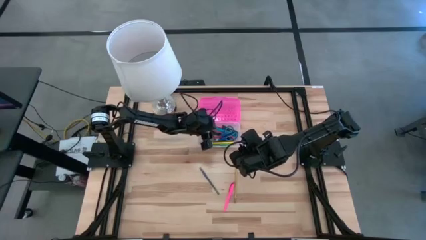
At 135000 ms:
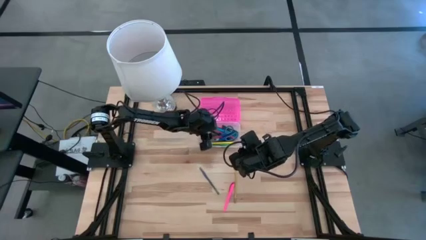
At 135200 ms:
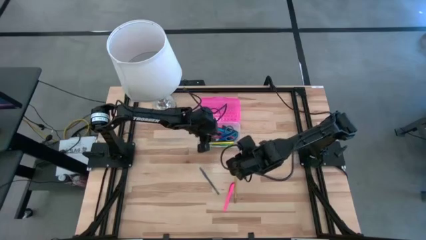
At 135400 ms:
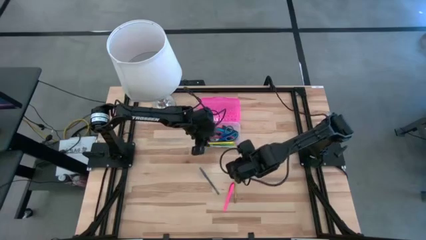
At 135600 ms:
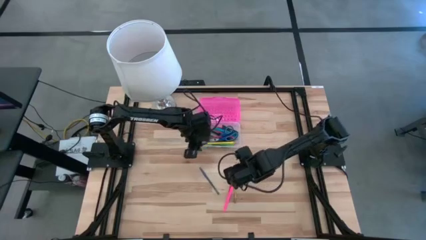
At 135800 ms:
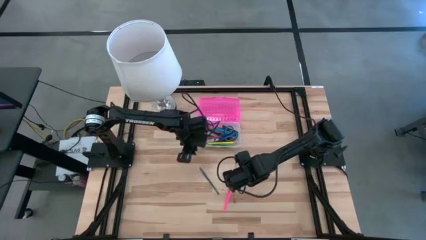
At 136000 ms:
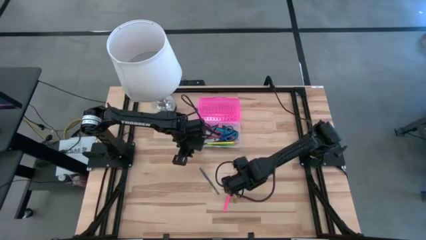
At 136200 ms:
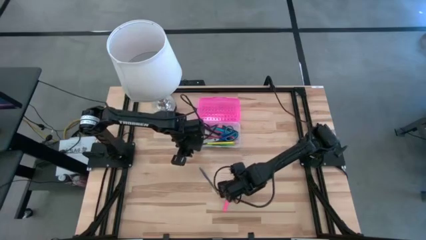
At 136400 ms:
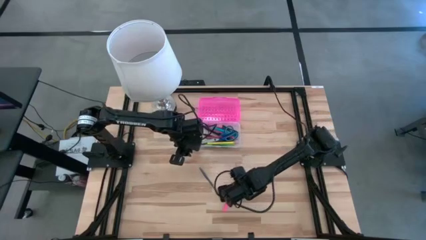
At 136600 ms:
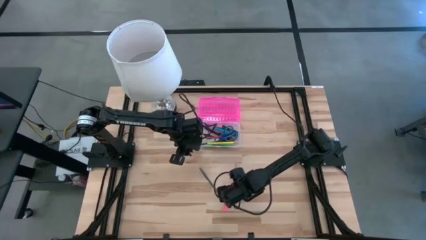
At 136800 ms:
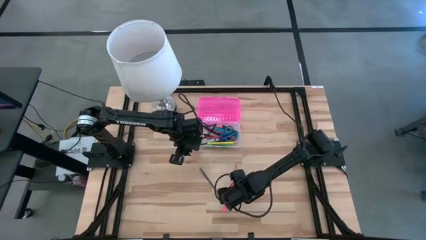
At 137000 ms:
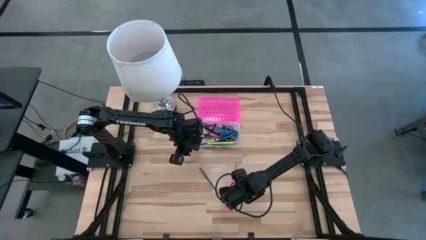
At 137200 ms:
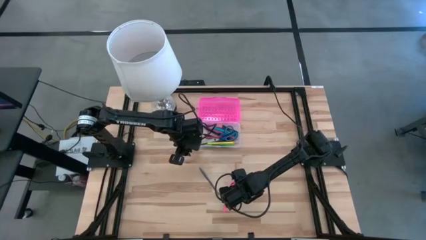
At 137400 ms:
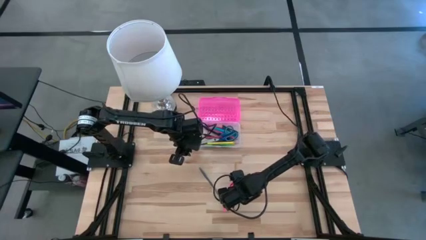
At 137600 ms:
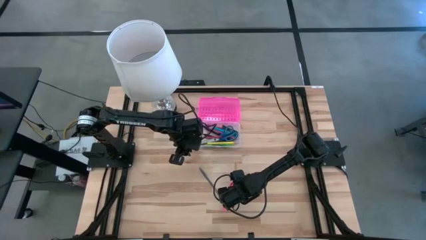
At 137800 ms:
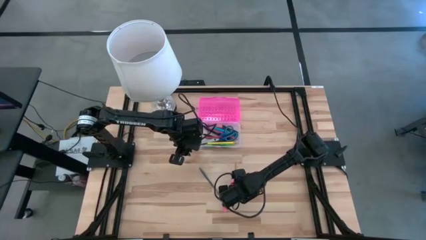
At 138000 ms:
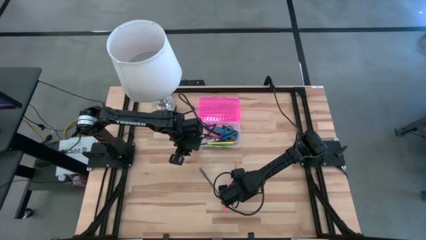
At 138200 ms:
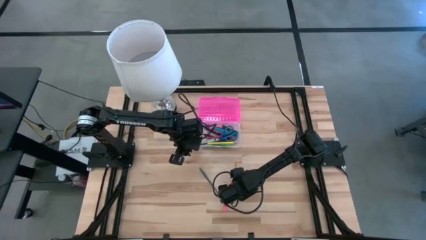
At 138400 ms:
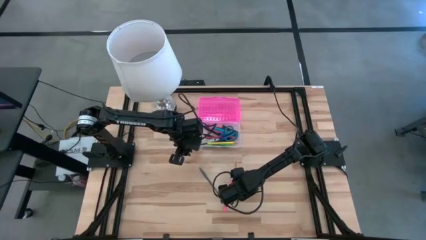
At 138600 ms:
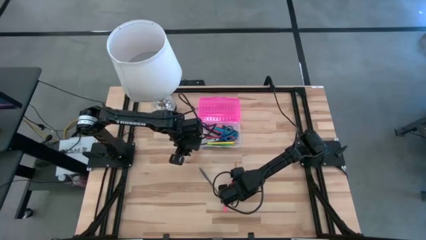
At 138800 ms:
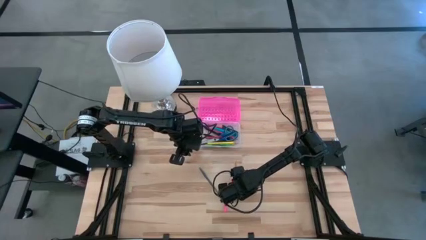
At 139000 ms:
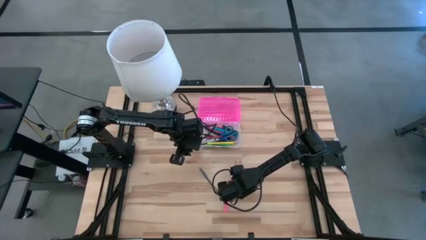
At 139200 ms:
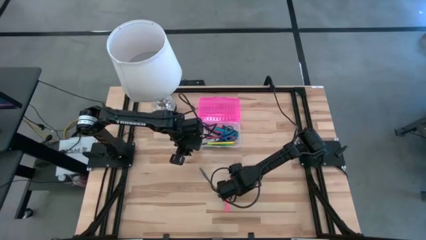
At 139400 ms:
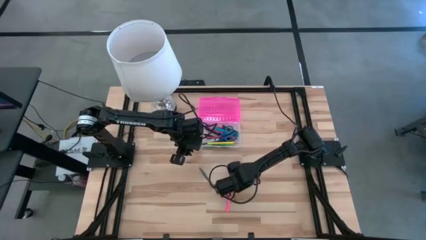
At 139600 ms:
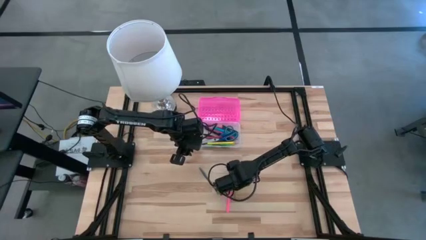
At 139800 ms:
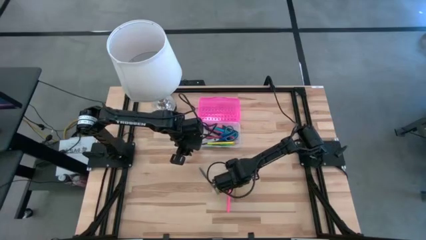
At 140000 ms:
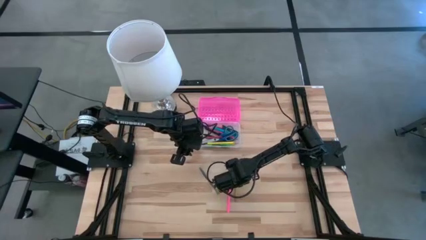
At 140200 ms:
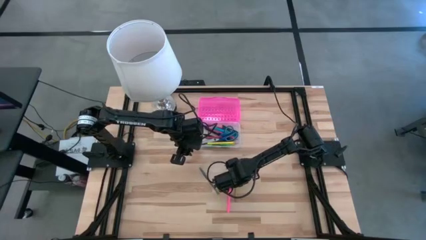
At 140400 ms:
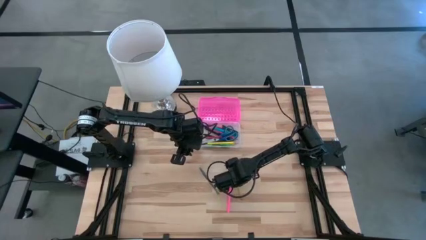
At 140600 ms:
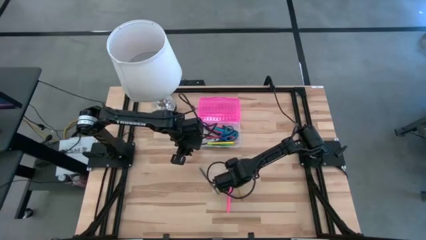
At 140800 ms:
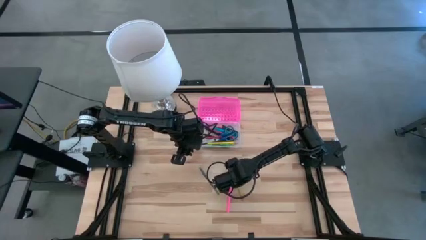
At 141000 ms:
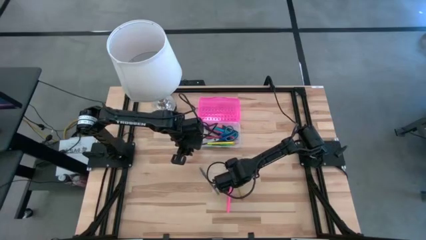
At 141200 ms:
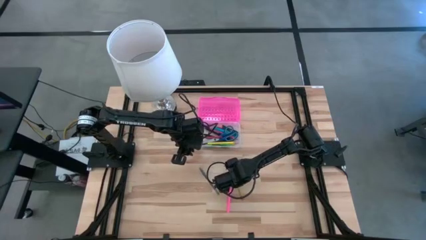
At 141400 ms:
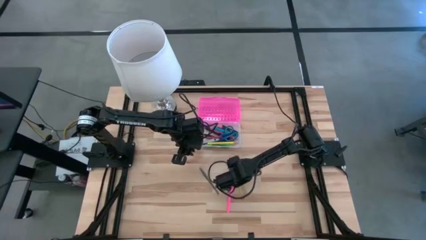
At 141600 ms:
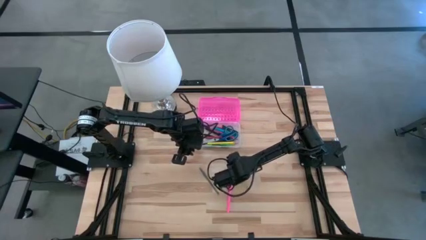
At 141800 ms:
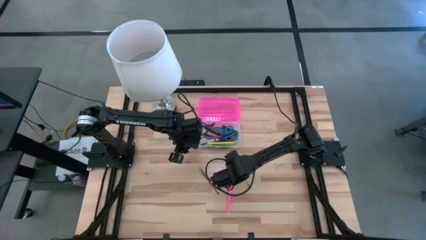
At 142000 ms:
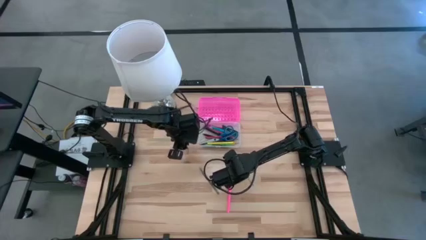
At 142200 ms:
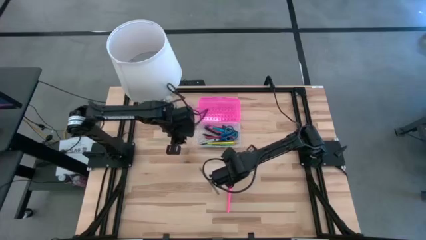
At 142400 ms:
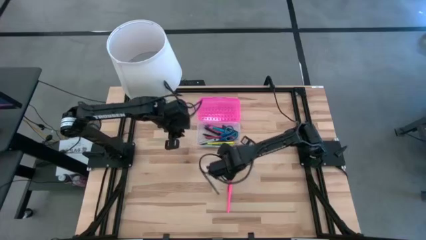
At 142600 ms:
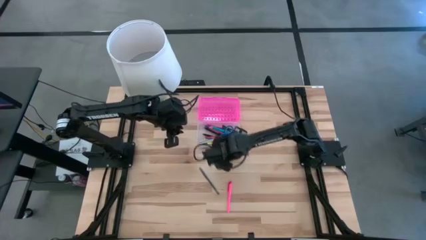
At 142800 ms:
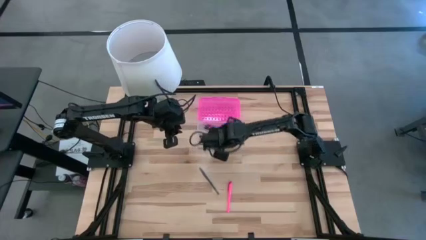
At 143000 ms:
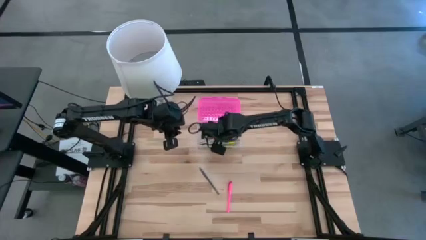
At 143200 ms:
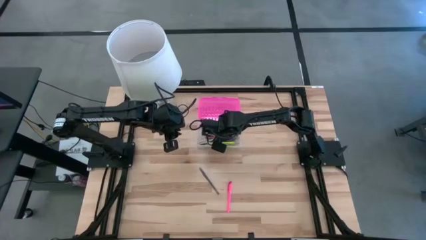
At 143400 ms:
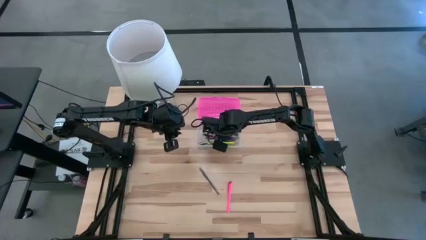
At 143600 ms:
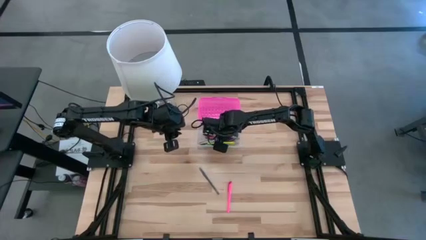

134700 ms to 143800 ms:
Task: Pick & place school supplies into a supply box
Put the yellow pencil into the pink supply box

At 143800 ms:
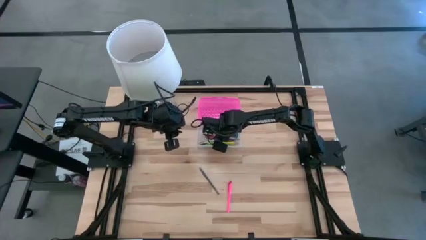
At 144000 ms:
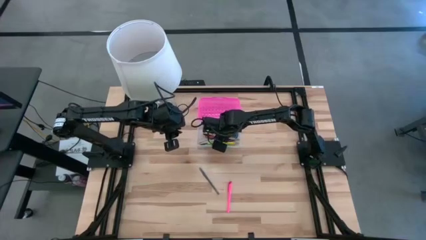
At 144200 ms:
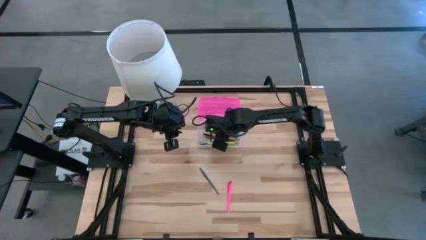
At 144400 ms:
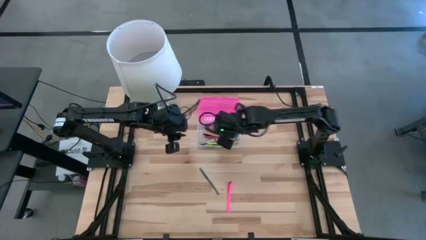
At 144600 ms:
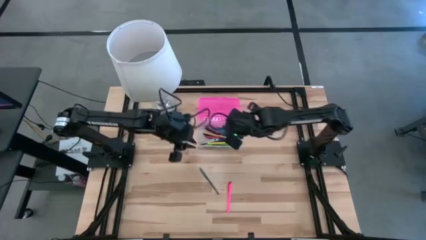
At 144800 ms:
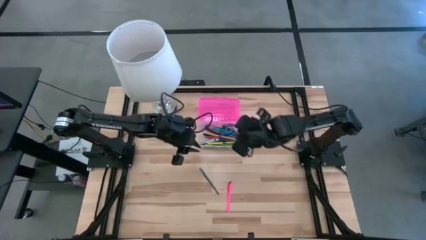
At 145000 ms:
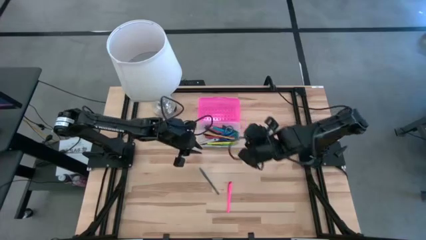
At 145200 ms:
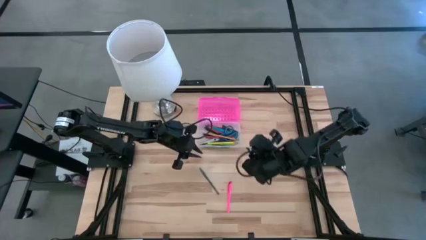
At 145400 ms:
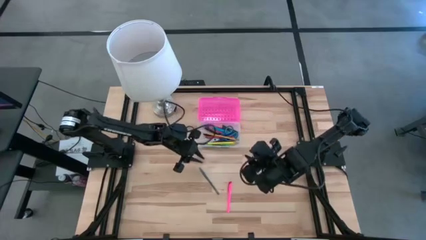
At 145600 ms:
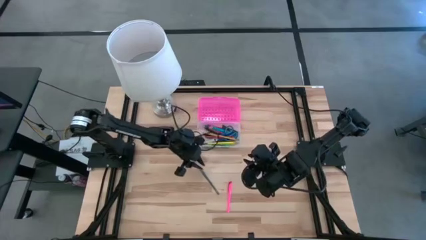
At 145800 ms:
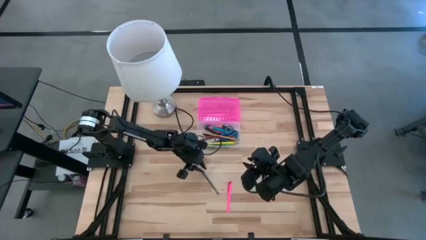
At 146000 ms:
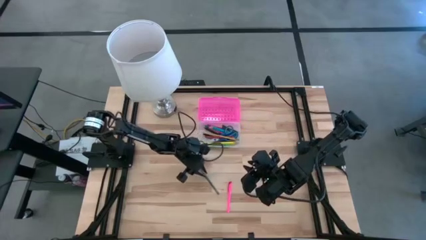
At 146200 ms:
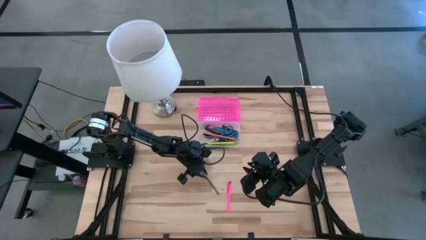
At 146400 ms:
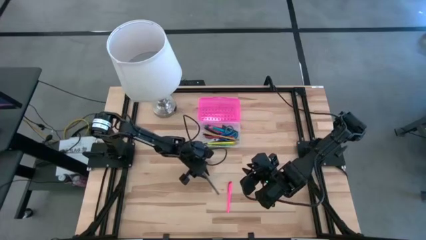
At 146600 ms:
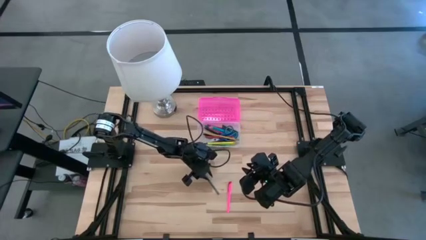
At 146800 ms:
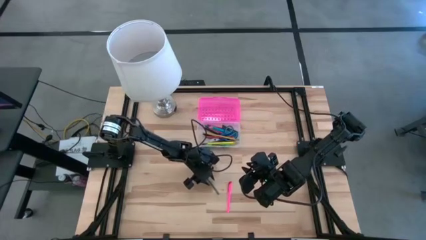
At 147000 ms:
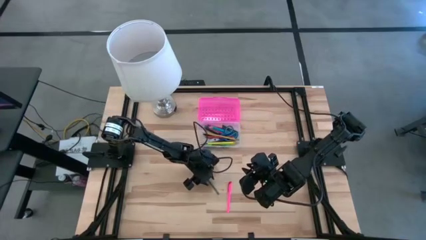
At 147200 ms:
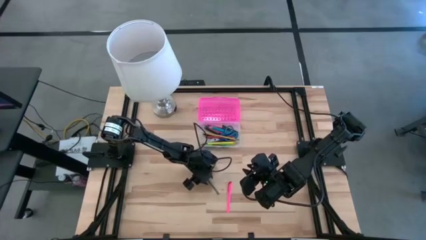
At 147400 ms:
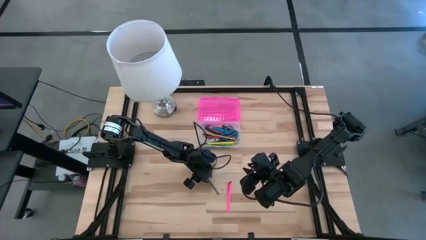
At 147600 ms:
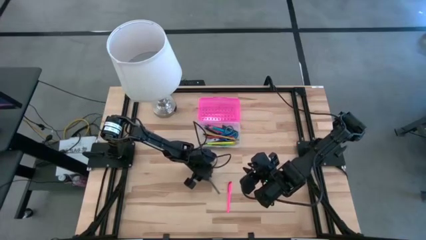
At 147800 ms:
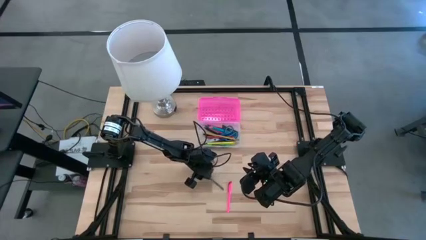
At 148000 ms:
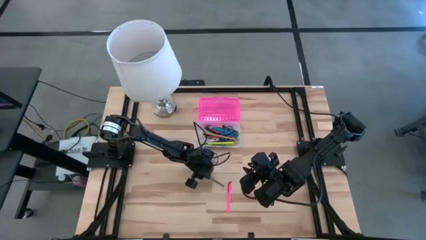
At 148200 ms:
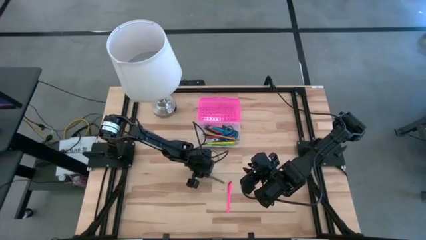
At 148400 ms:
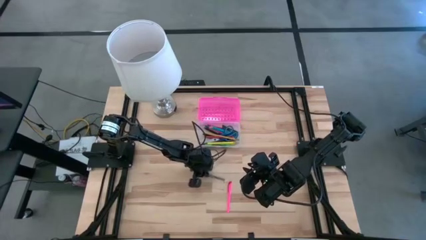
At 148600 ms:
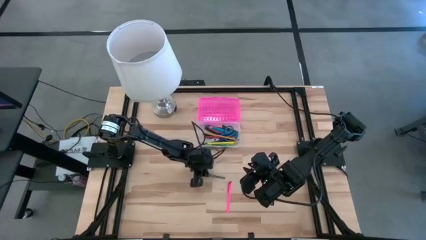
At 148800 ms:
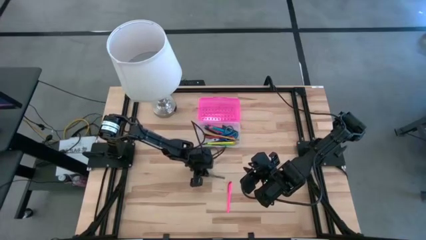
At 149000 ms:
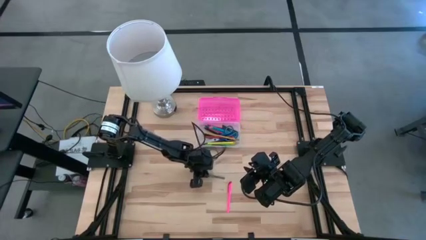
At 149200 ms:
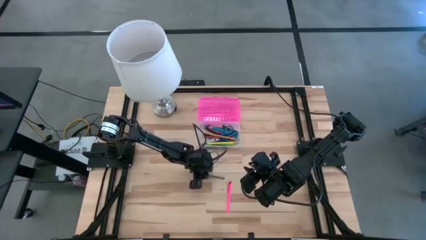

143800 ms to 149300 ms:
Put the gray pen into the pink supply box

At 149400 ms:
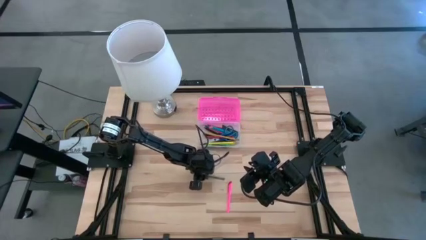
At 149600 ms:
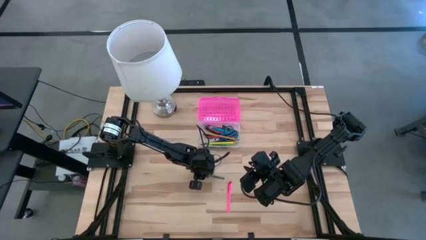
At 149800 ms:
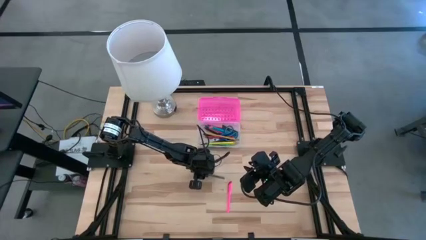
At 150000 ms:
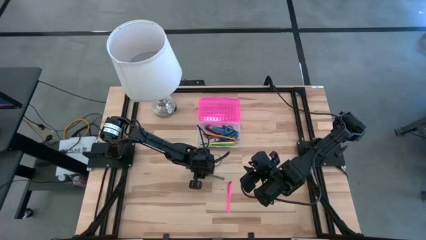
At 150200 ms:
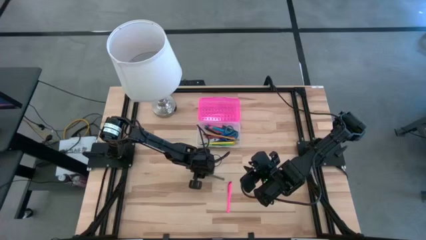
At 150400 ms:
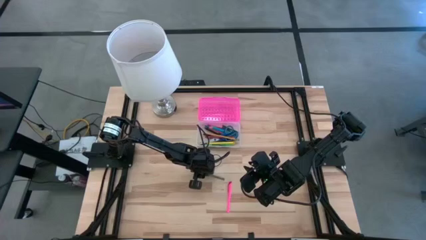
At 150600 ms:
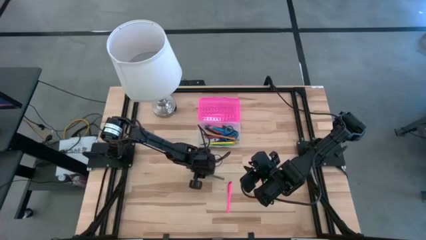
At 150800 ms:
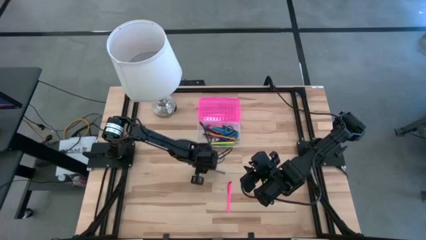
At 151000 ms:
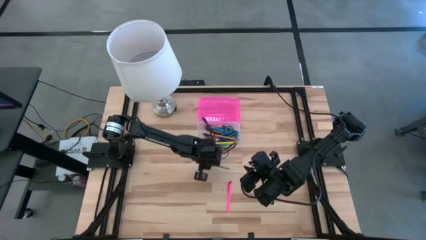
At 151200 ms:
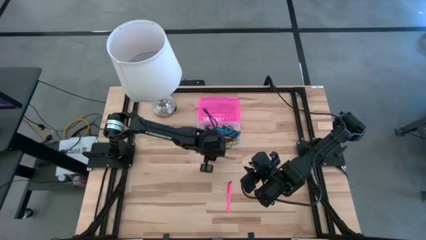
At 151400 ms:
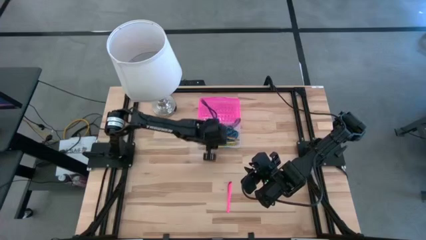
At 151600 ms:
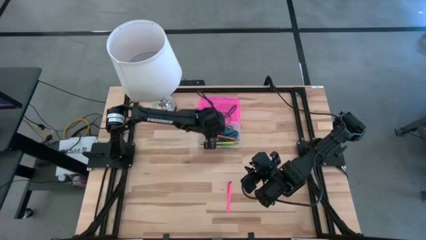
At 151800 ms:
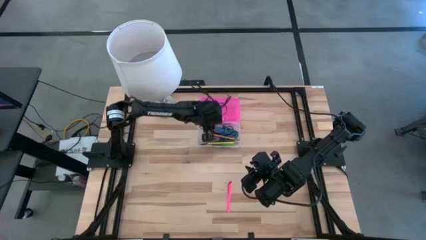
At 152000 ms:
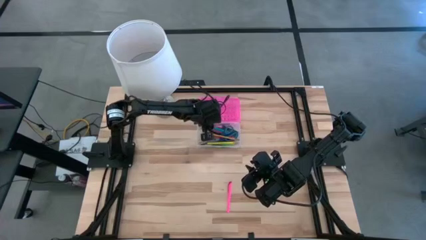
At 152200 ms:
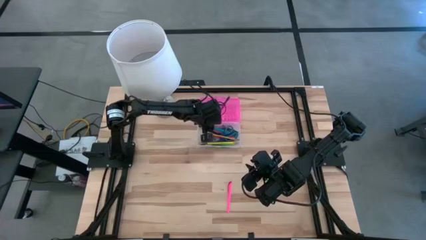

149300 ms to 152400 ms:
Put the gray pen into the pink supply box
